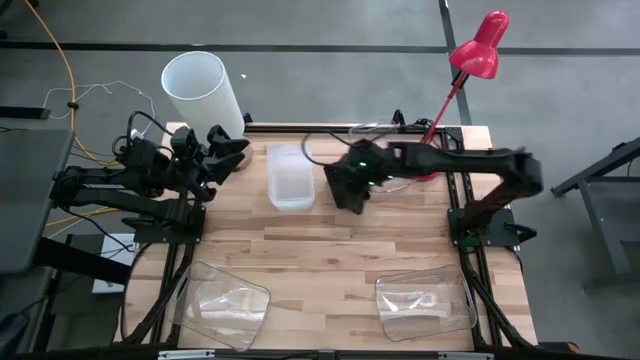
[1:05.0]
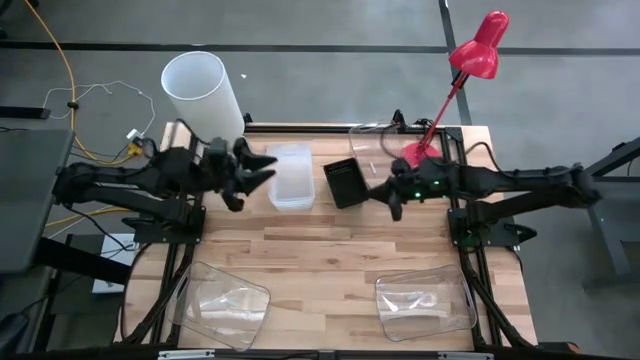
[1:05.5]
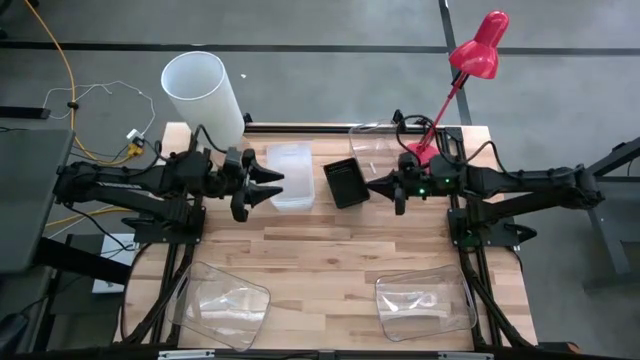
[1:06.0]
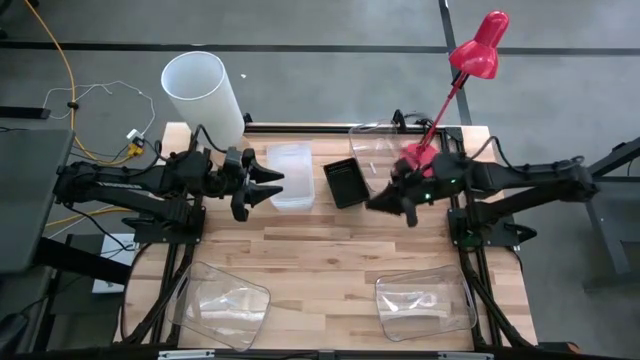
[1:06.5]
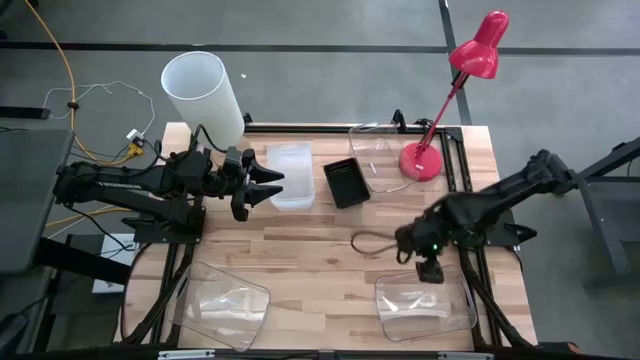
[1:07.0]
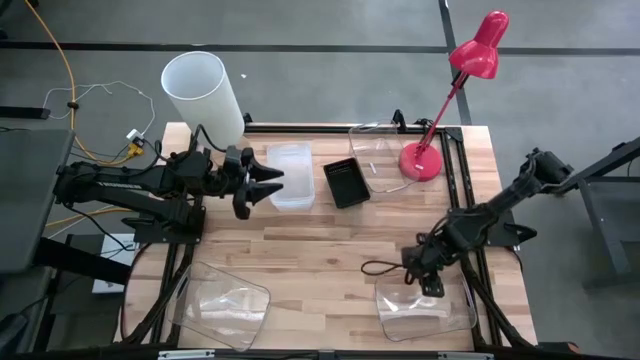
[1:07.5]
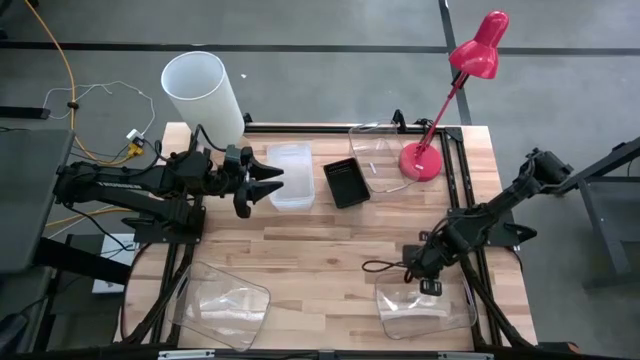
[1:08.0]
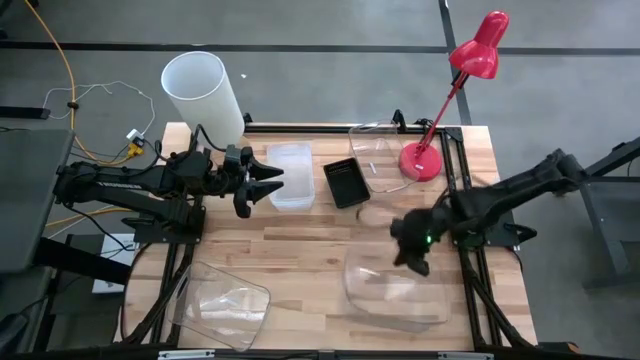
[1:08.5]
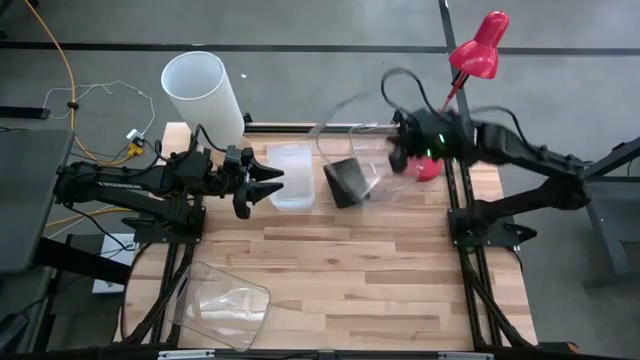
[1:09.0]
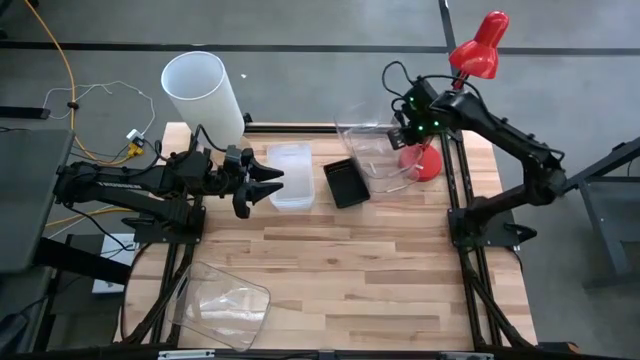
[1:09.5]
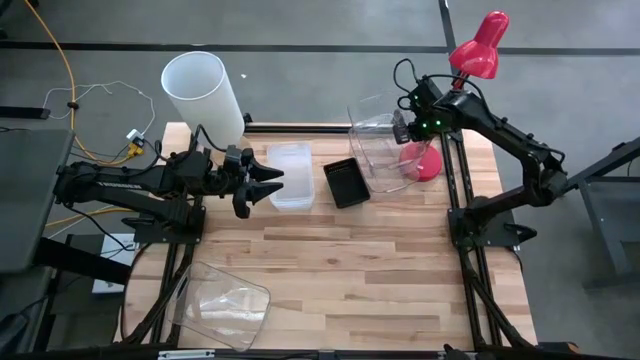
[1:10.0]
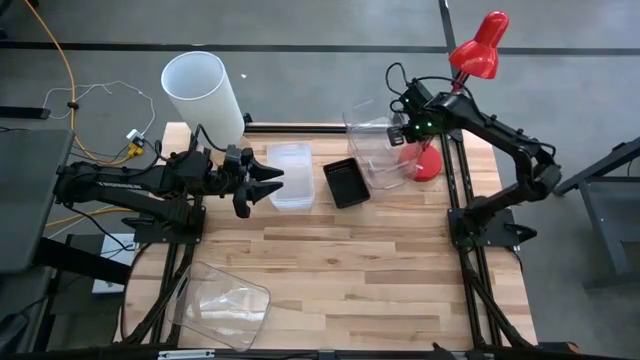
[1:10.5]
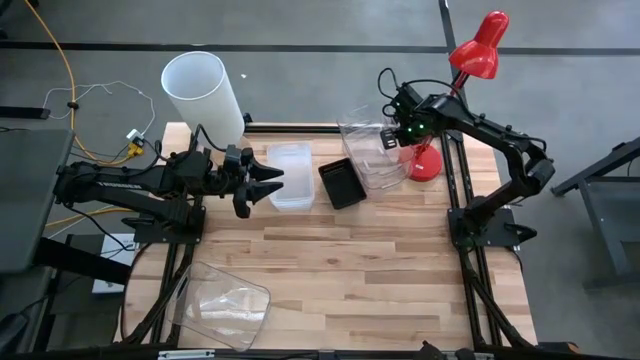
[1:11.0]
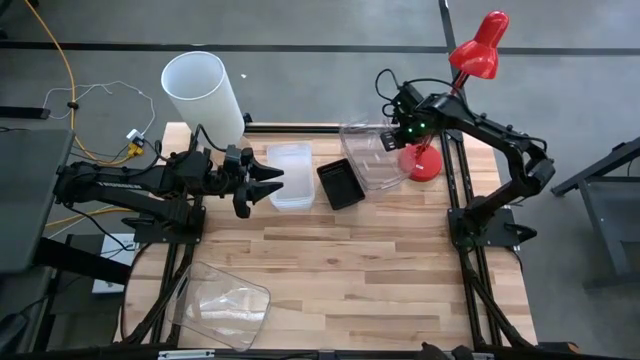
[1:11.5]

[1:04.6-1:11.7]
Stack the bottom right transparent bin on the top right transparent bin

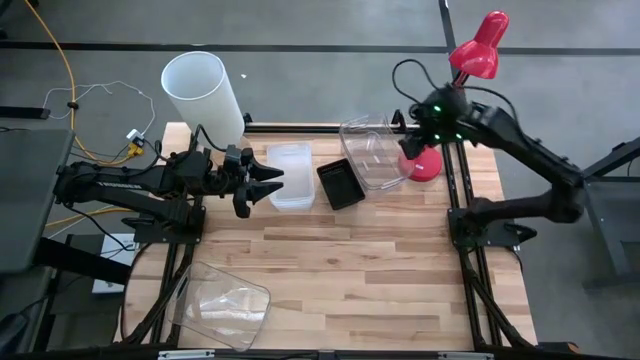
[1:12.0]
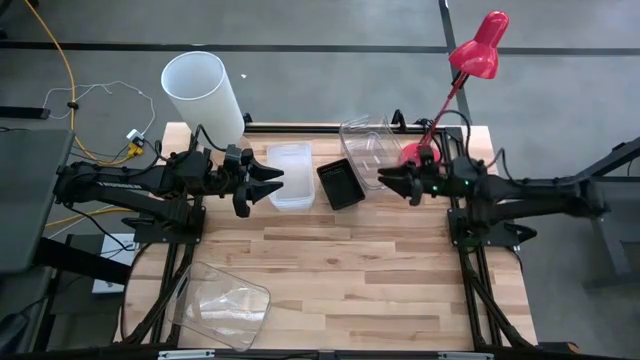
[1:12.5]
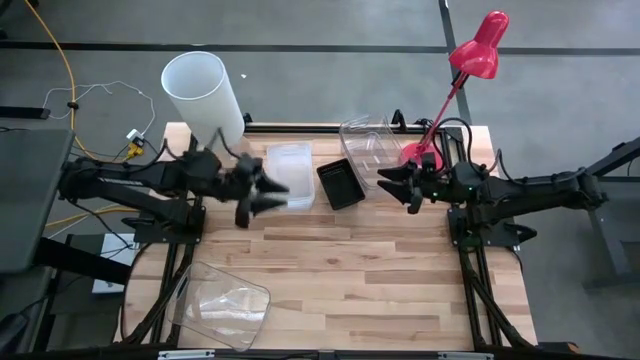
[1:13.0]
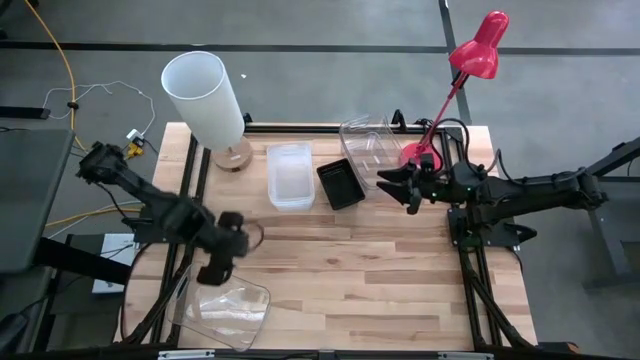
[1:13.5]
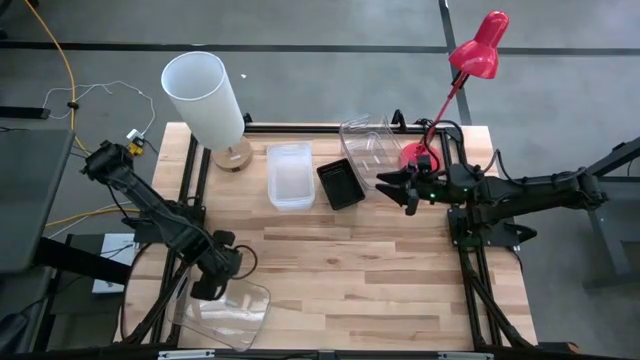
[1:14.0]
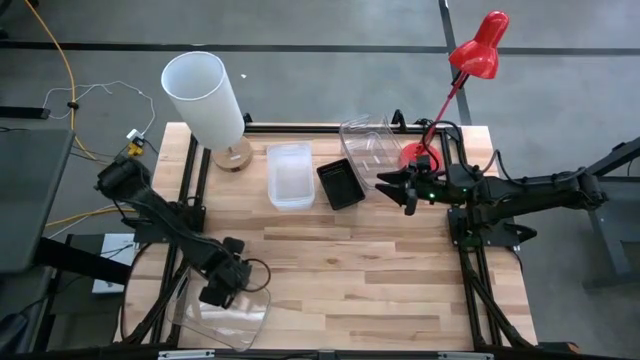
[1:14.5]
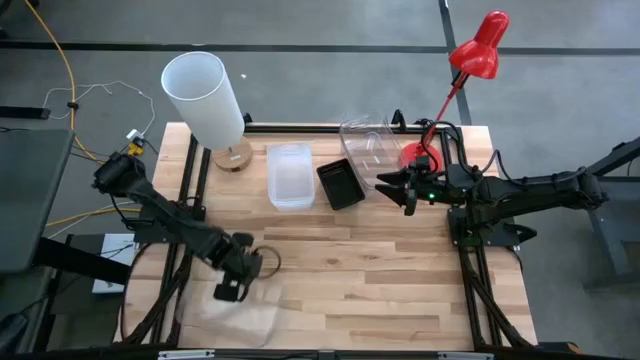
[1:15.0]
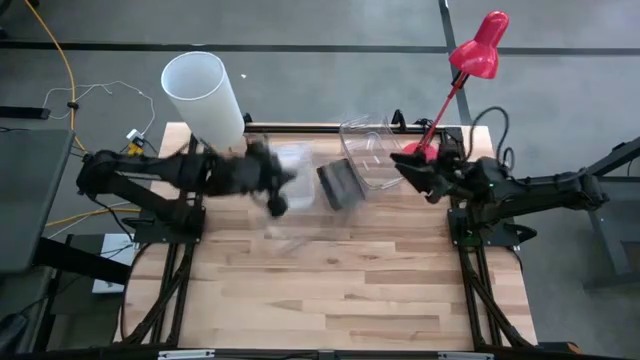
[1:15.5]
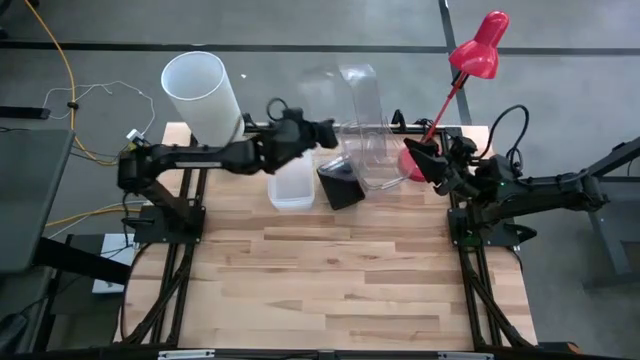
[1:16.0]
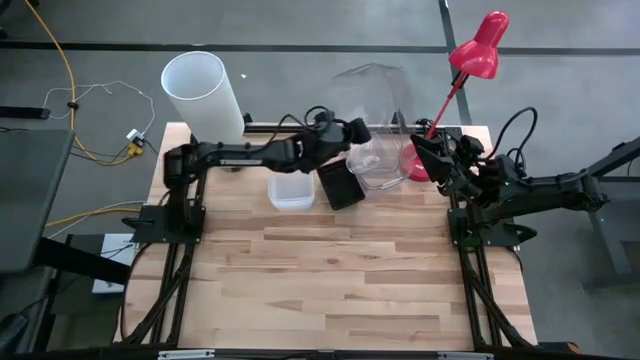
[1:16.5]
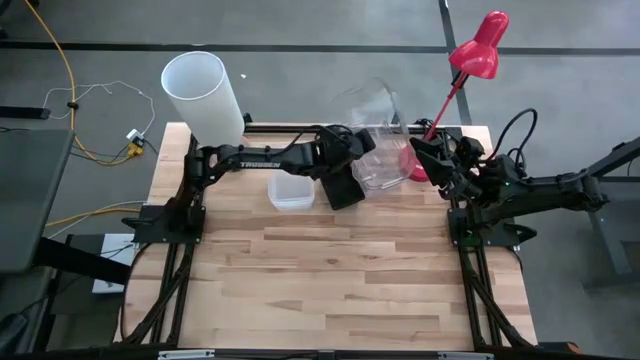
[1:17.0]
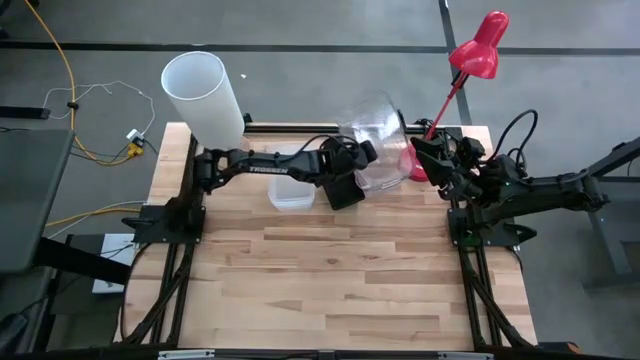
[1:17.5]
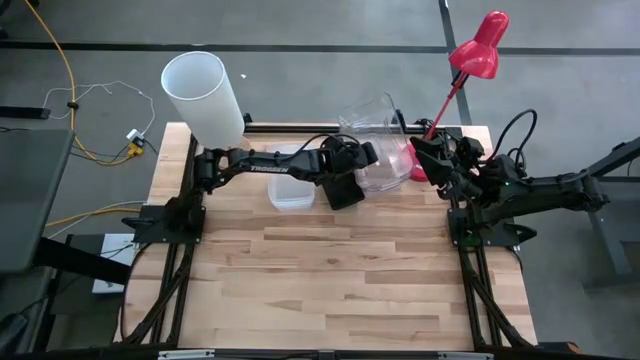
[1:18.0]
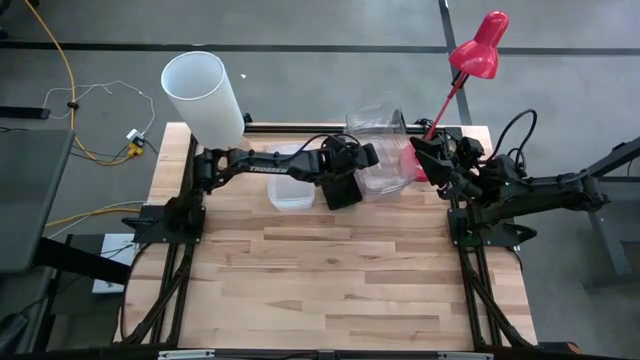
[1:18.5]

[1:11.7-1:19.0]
Stack the transparent bin on the transparent bin

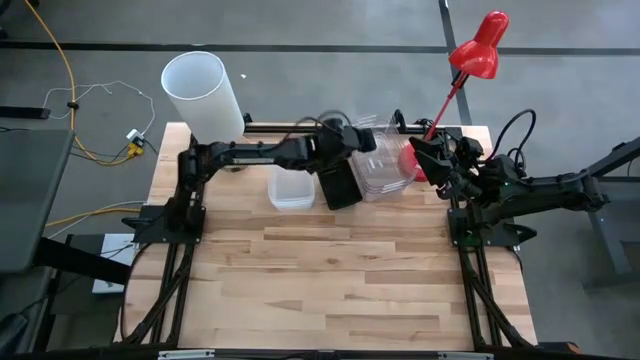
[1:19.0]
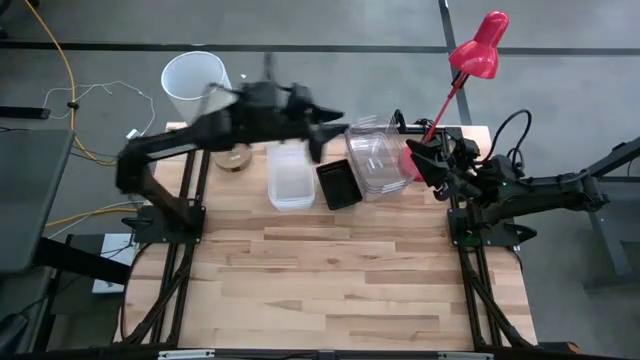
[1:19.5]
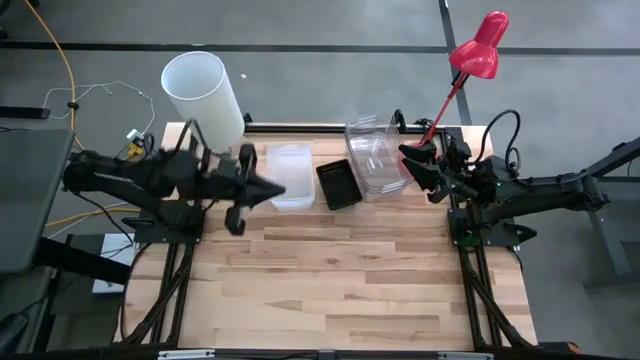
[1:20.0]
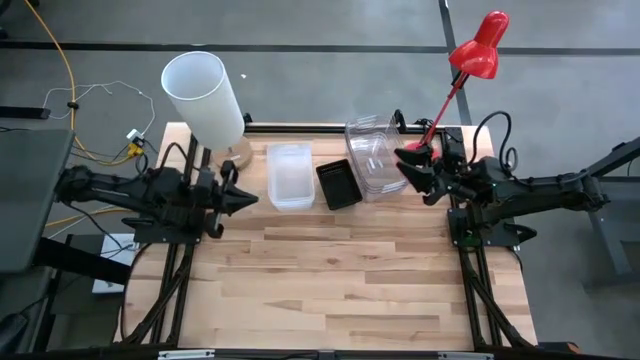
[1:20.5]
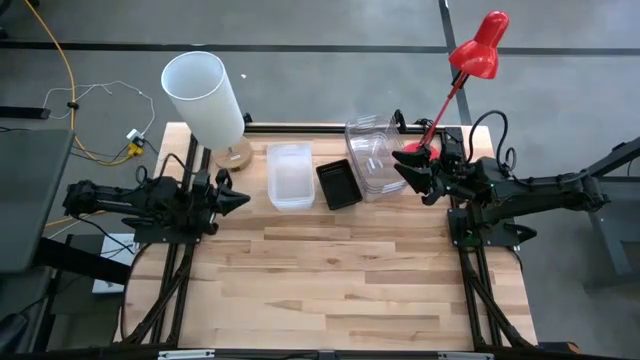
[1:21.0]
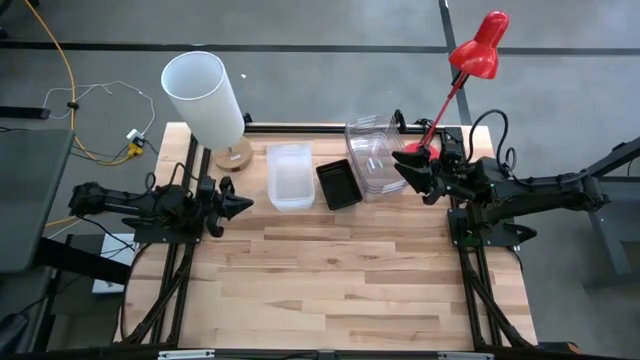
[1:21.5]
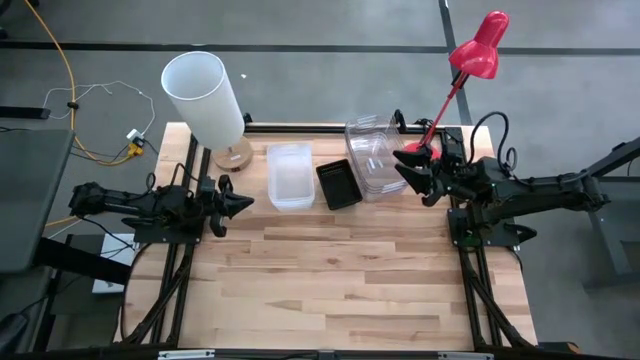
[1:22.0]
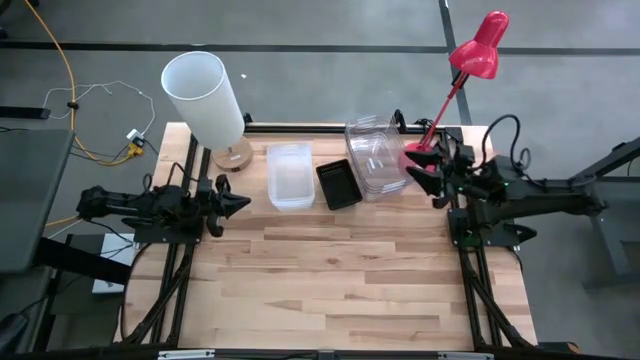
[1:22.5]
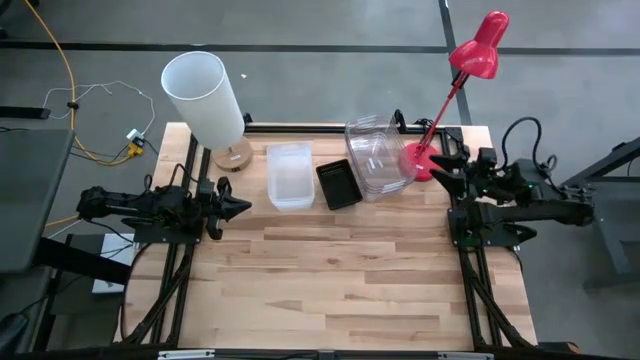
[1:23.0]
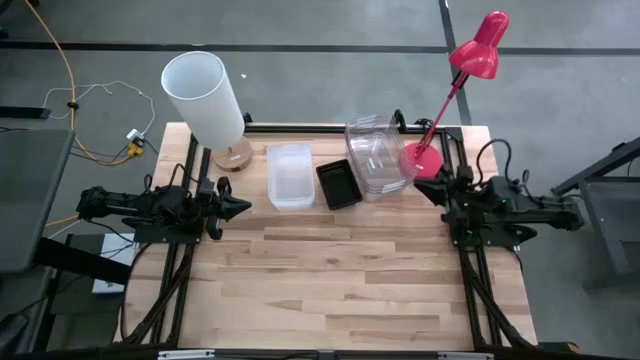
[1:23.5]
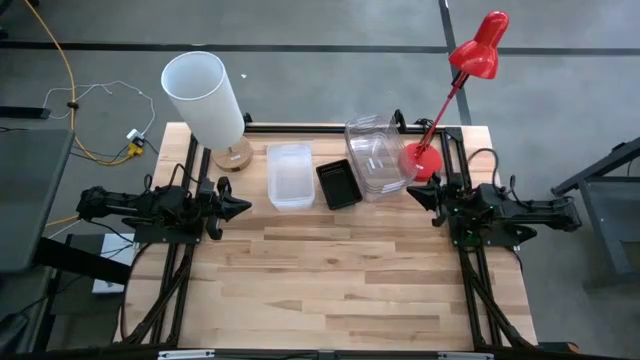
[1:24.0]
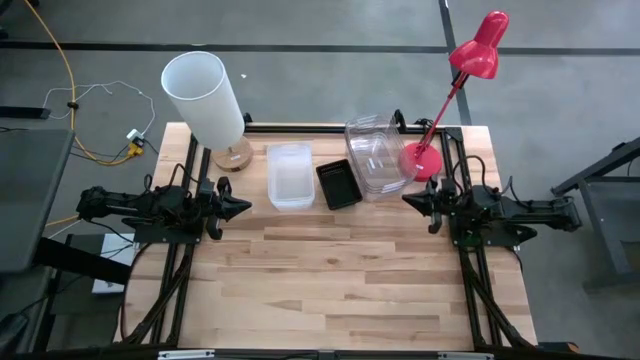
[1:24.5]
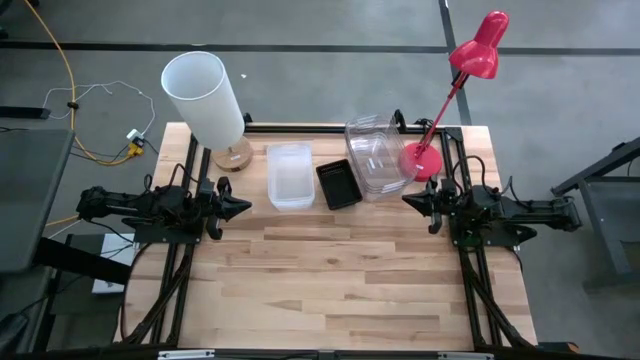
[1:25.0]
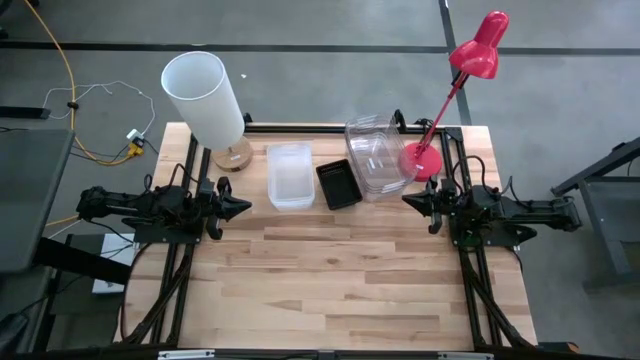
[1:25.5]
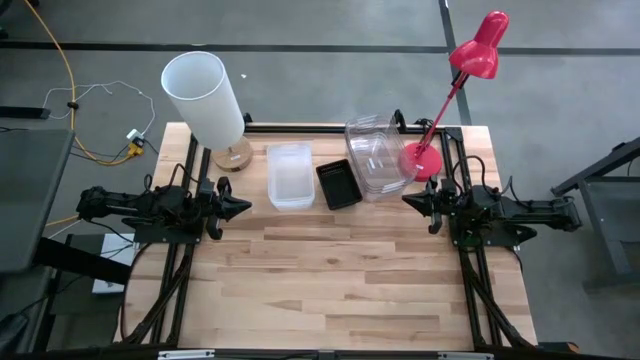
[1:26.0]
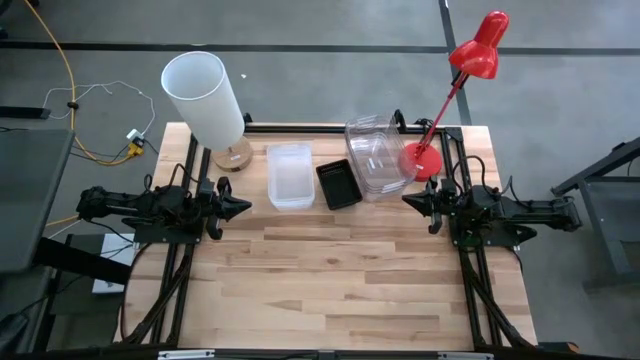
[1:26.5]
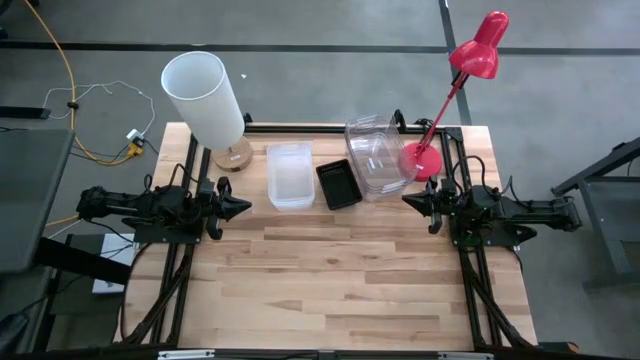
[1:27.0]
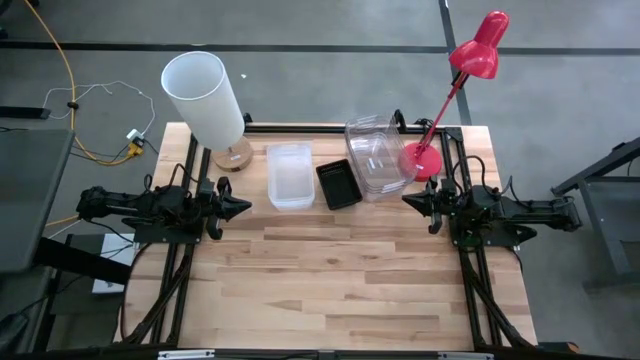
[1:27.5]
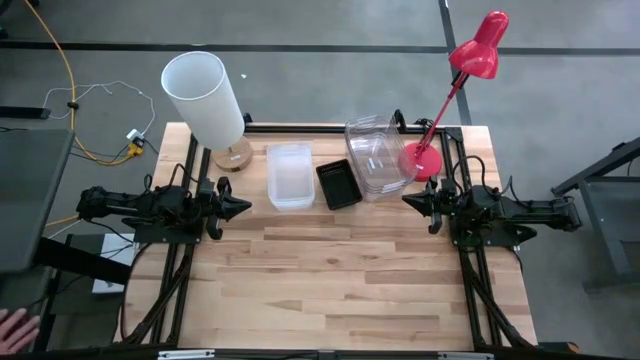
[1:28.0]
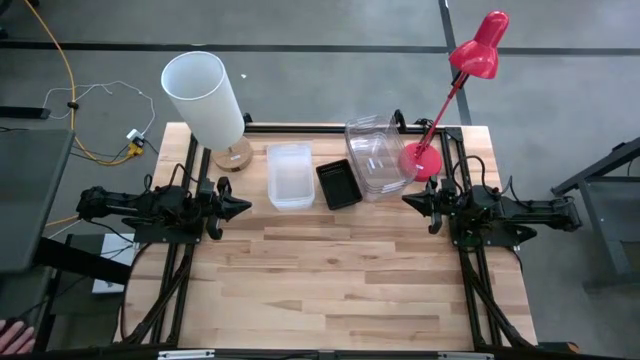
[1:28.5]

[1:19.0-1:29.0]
Return to Home Position
